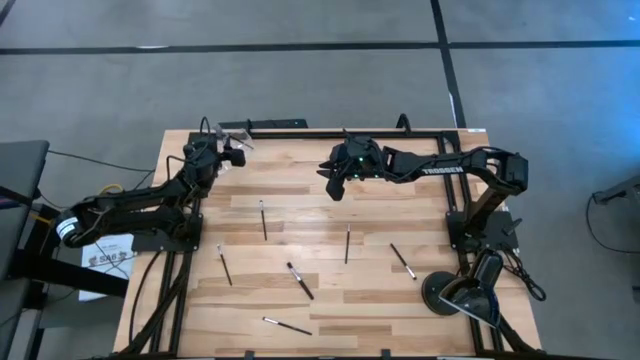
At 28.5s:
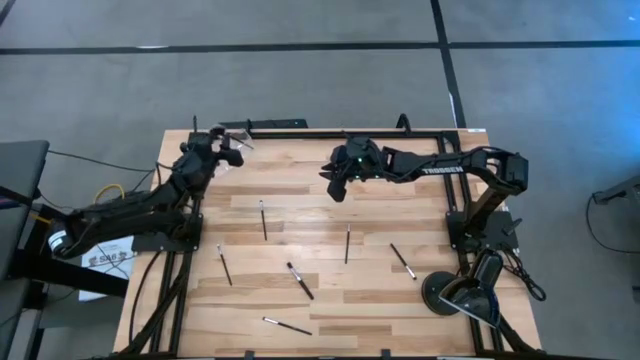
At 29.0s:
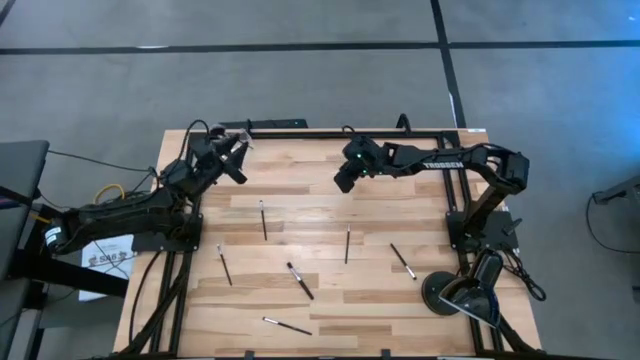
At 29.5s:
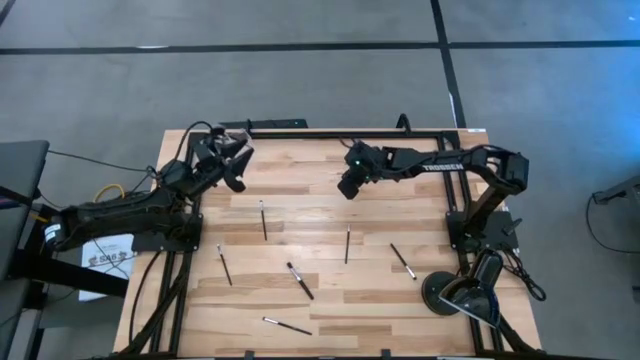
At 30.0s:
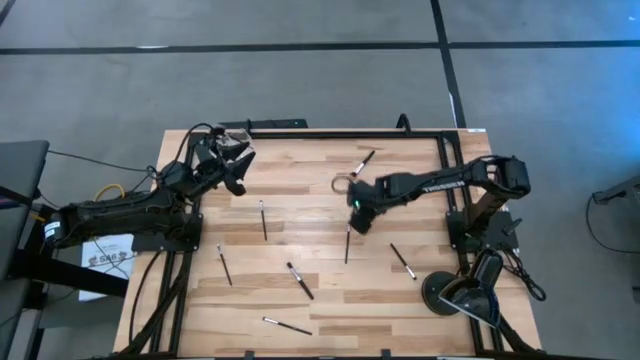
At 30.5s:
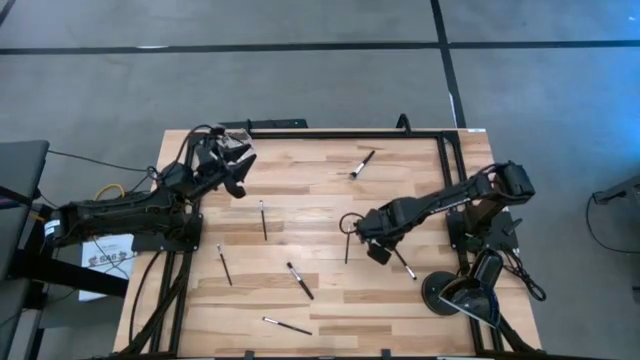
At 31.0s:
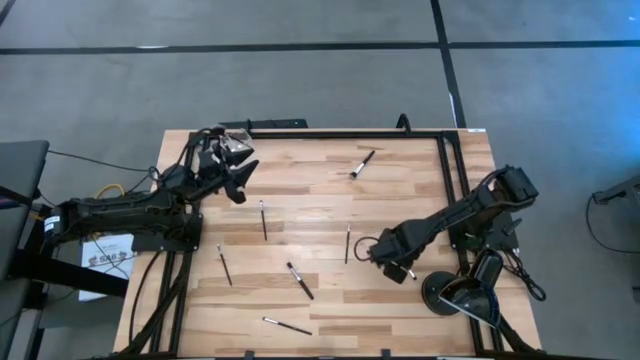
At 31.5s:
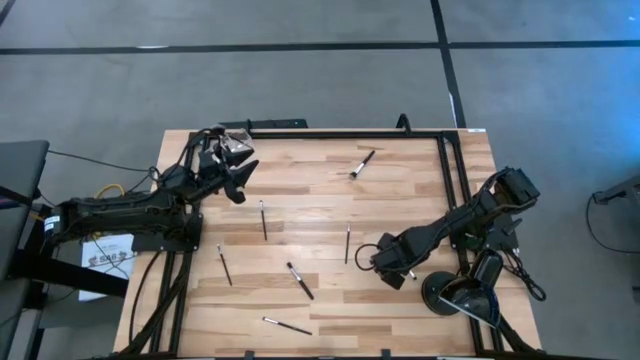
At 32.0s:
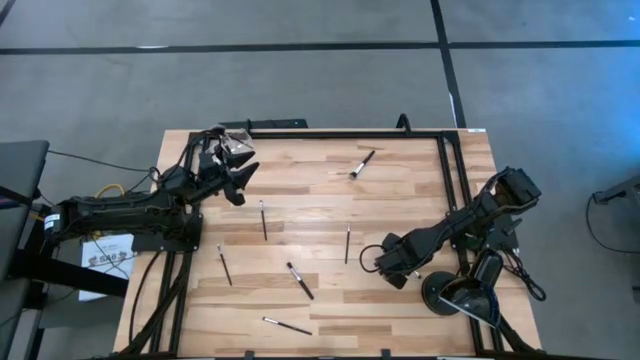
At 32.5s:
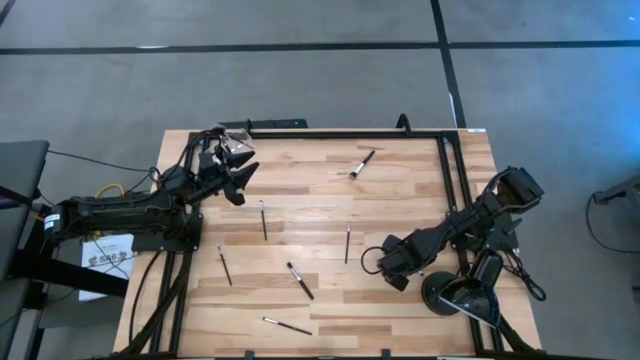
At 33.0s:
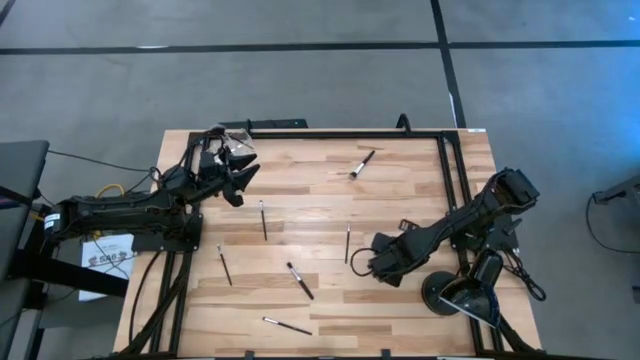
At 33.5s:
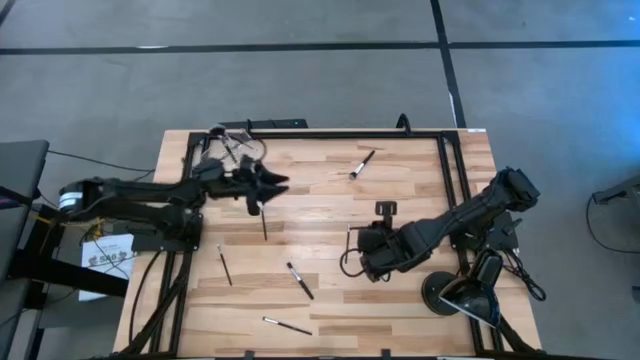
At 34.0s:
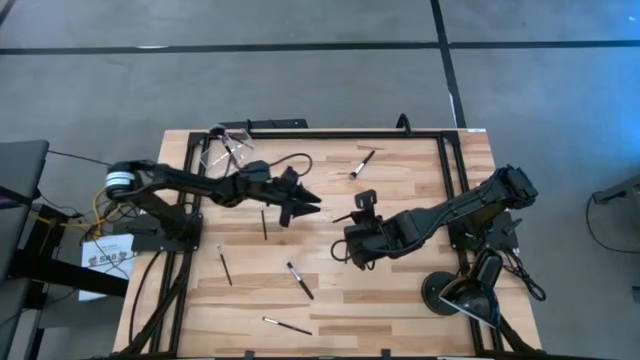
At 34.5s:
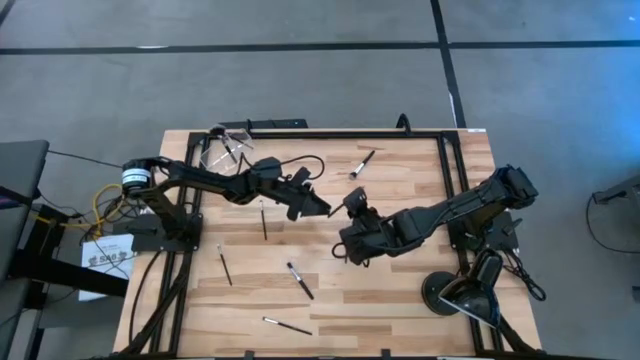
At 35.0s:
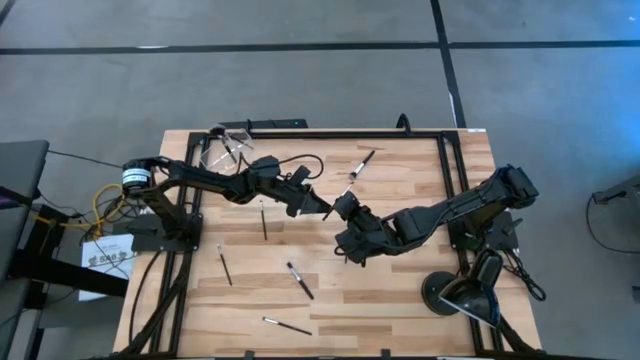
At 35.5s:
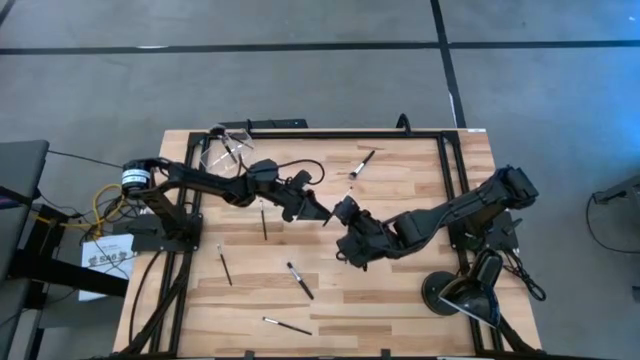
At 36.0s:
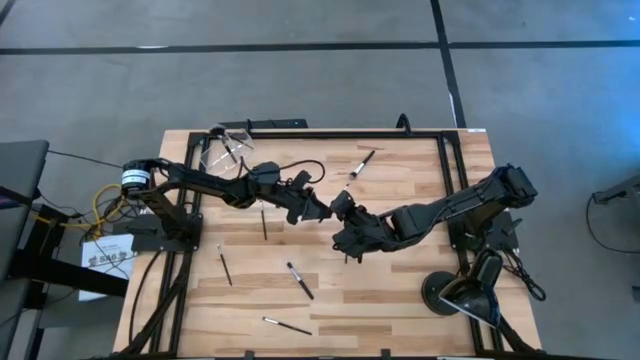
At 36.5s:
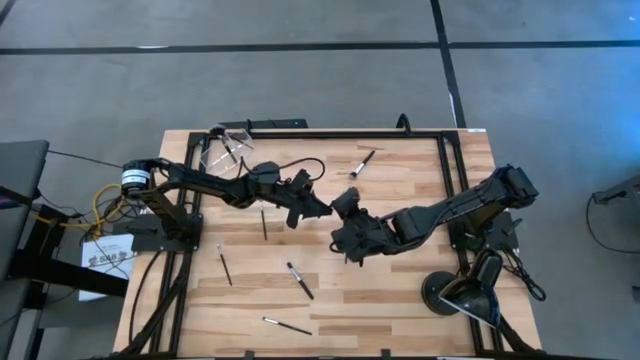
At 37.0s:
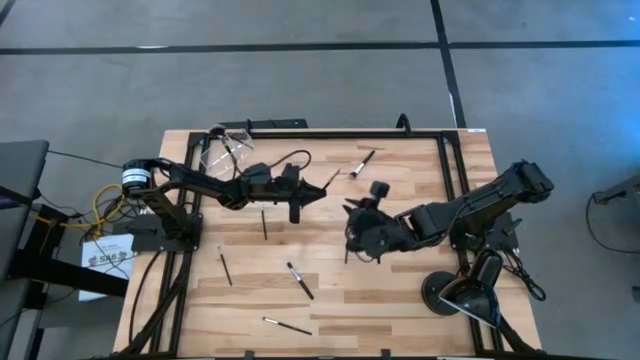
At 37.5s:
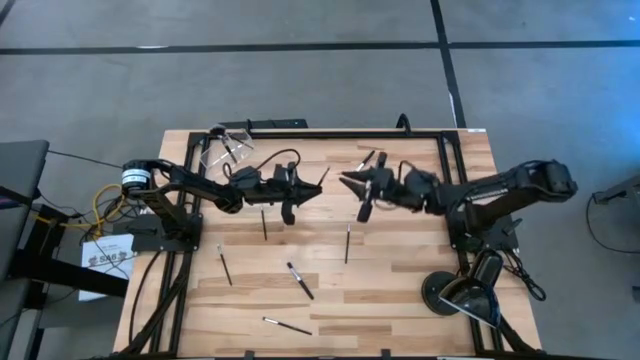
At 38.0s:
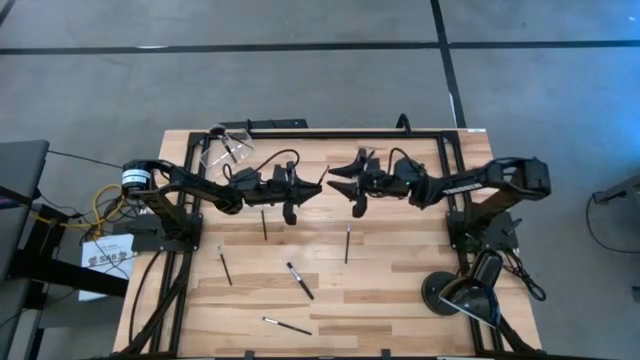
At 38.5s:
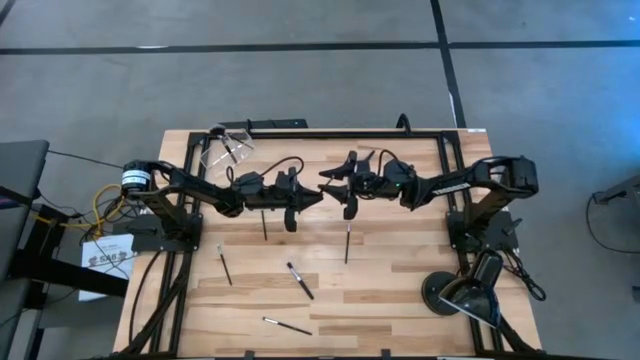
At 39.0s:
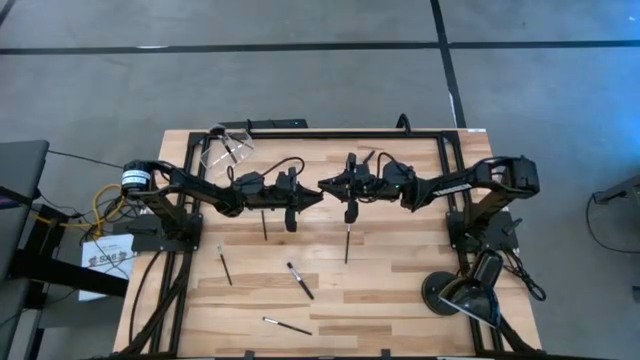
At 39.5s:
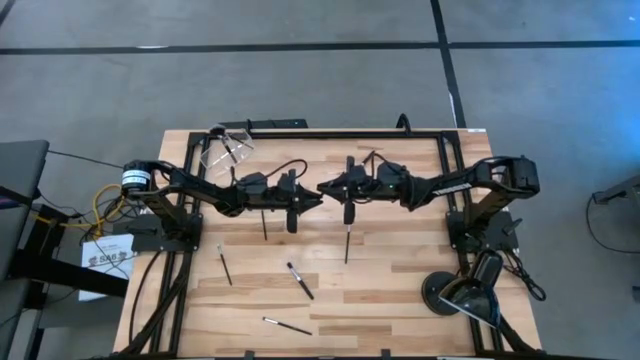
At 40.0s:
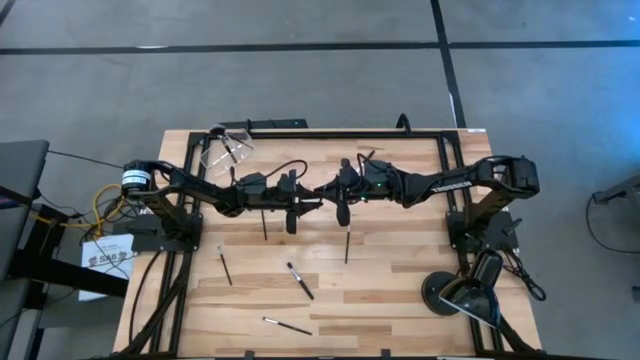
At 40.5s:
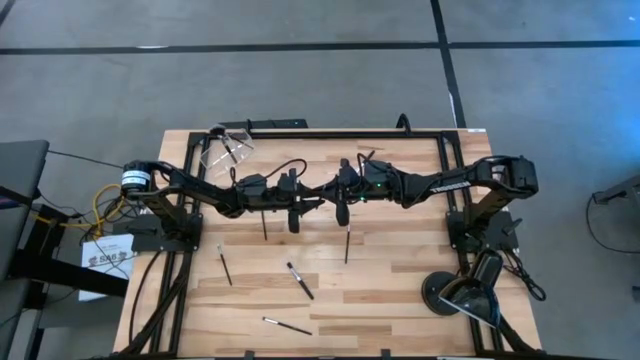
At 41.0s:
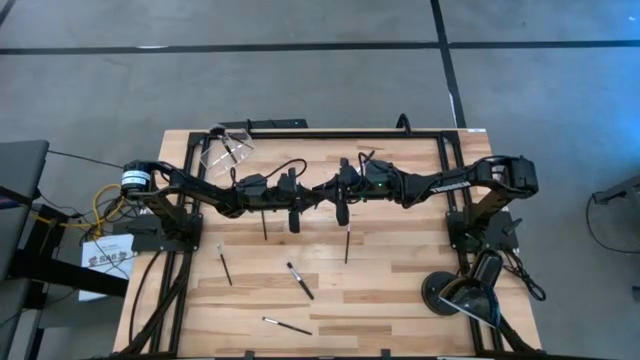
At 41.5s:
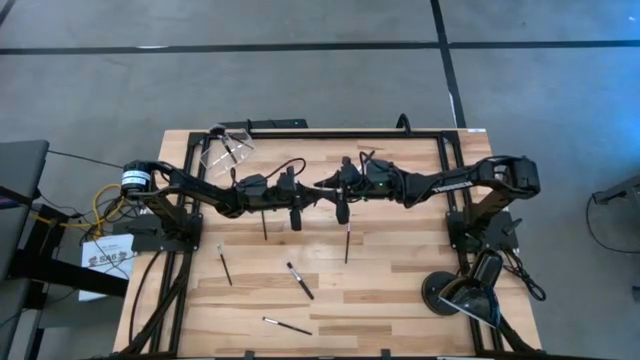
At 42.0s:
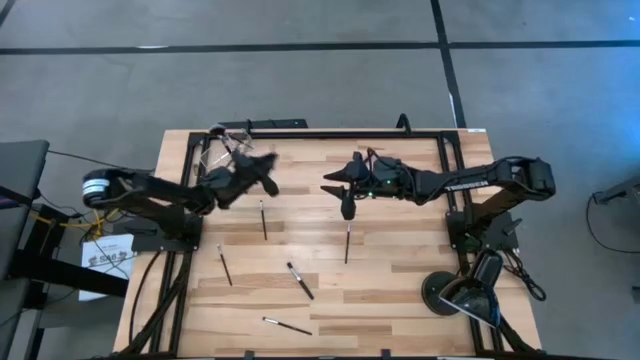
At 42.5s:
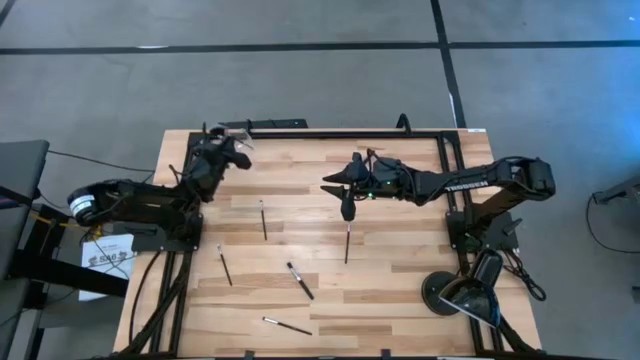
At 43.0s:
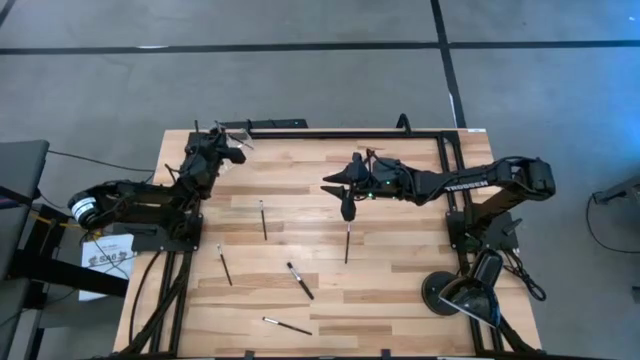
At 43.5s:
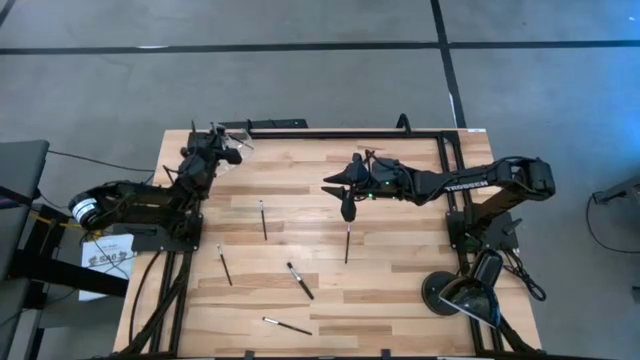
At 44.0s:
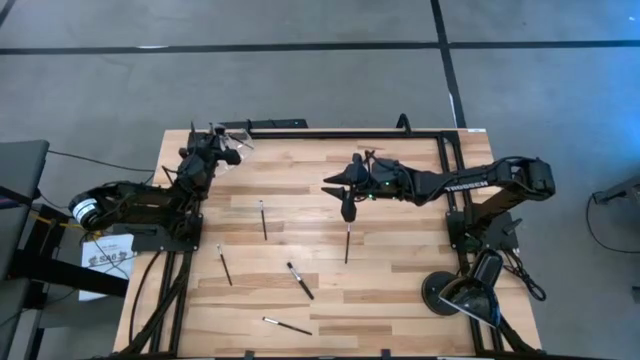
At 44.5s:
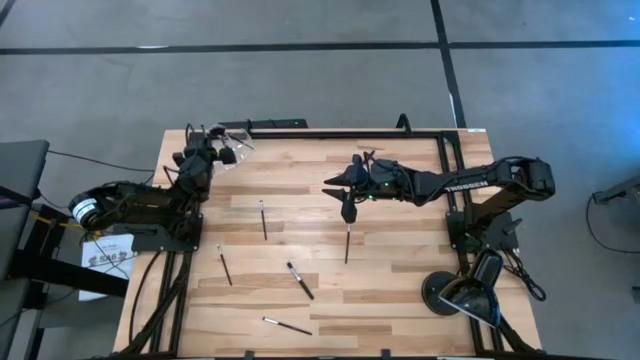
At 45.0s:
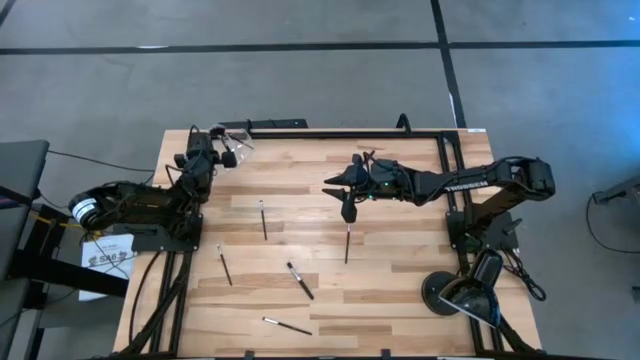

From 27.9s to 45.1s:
Task: Put items in baskets/containers
Put the eyeshadow brush into the transparent bin

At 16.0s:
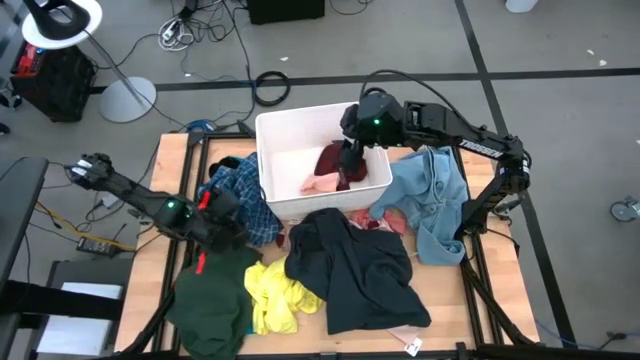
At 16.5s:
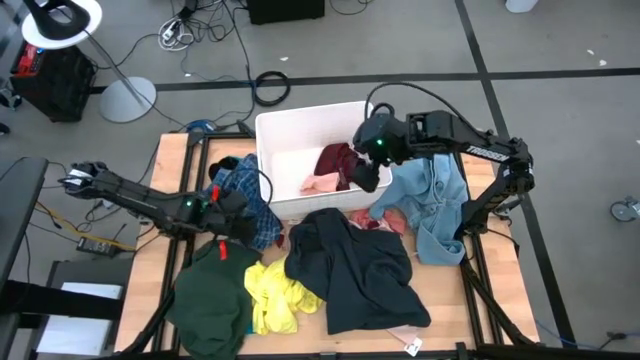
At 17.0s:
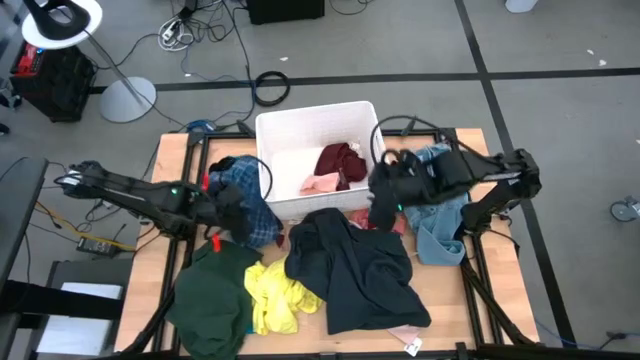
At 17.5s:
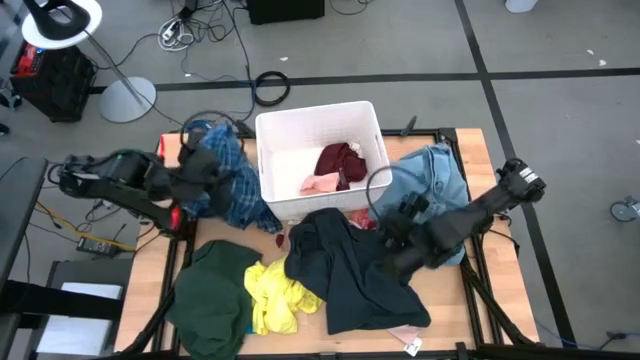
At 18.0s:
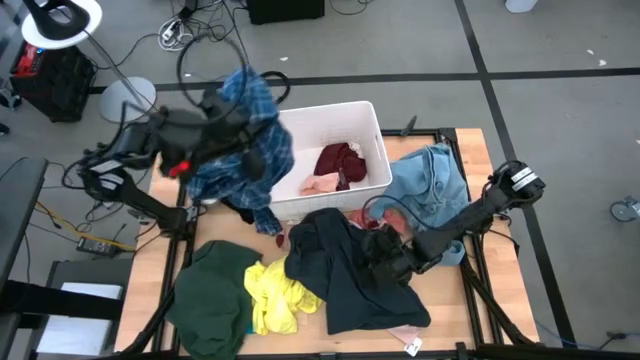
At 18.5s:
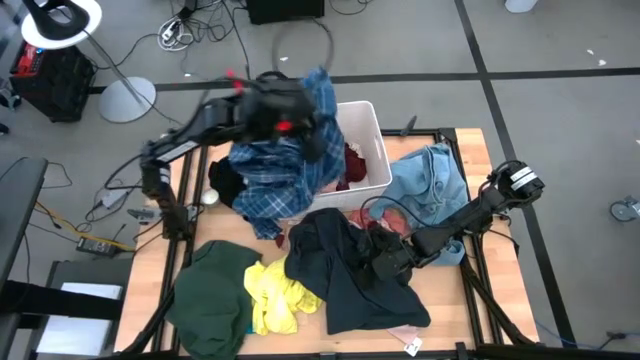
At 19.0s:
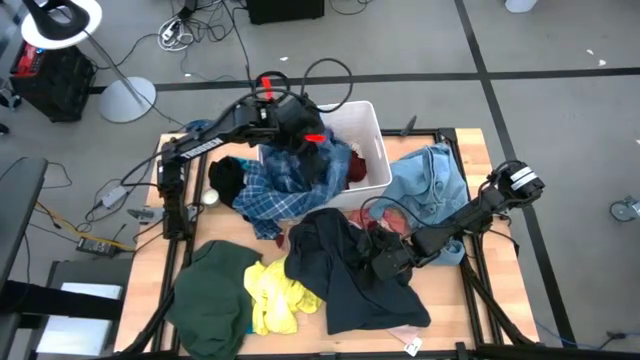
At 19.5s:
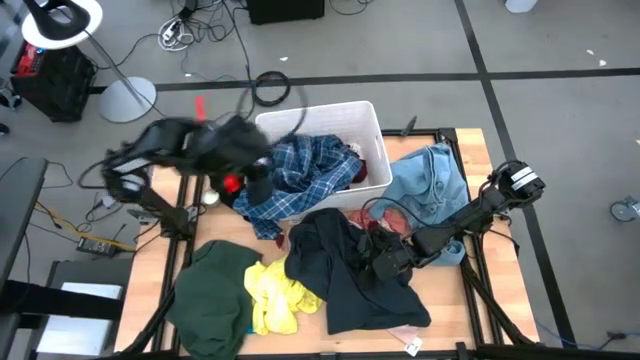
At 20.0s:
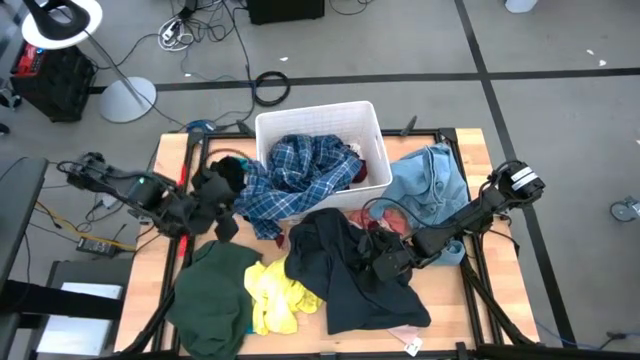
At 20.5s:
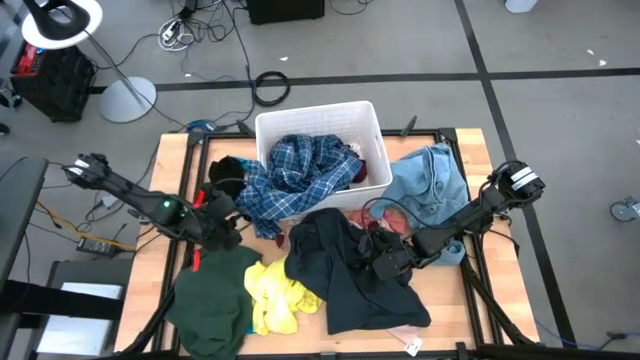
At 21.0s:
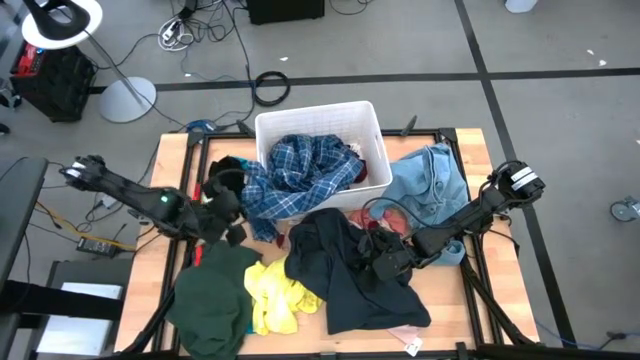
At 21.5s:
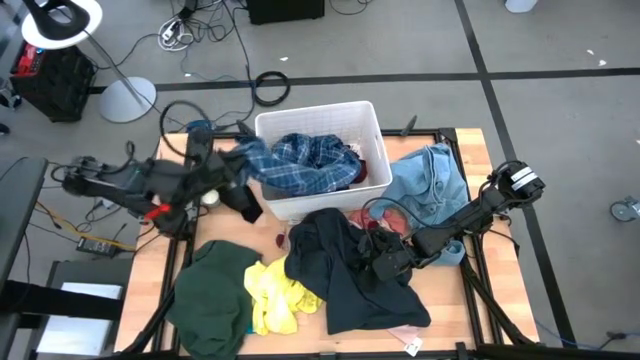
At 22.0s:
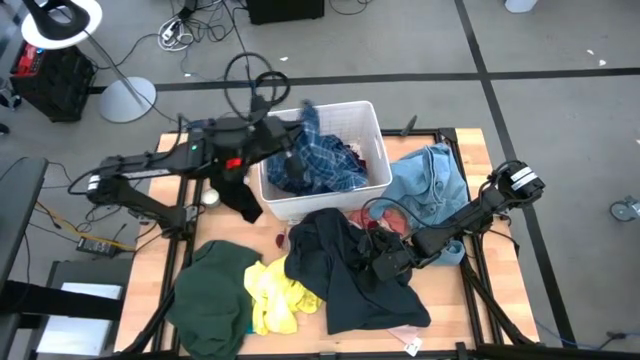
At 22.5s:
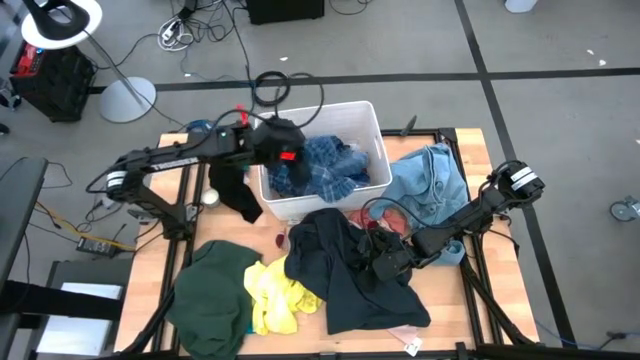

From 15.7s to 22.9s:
Task: Sort clothes
Put the blue checkered shirt into the white bin
